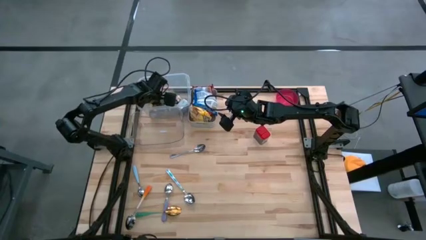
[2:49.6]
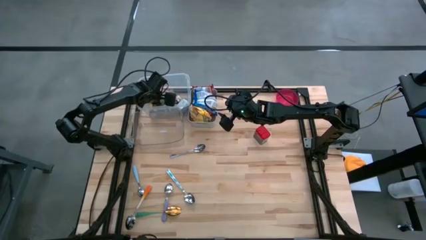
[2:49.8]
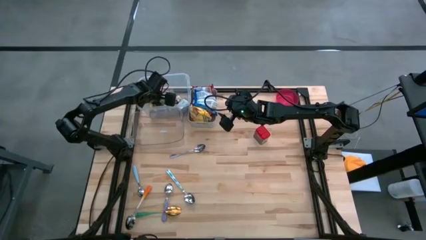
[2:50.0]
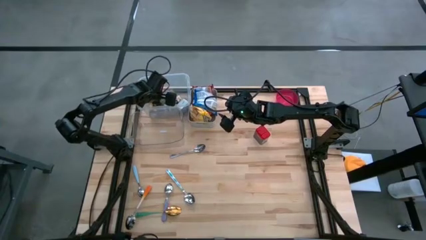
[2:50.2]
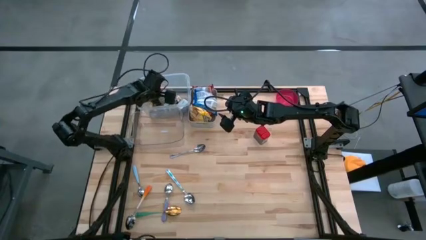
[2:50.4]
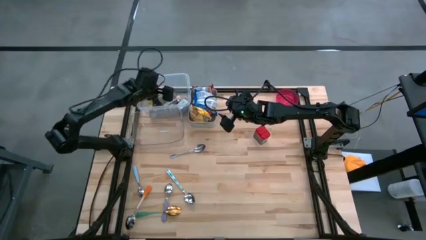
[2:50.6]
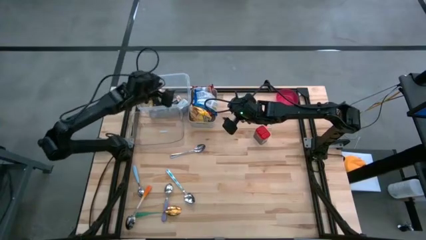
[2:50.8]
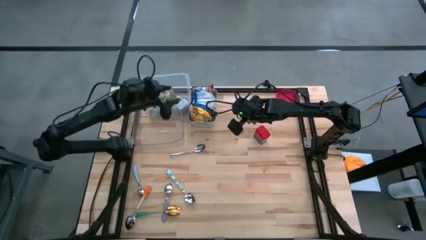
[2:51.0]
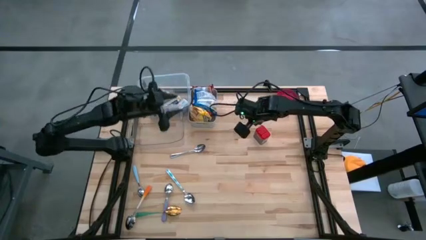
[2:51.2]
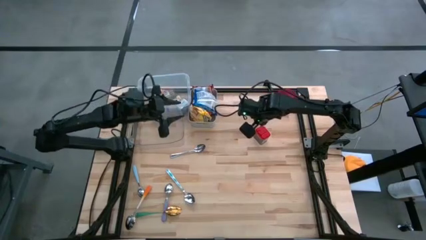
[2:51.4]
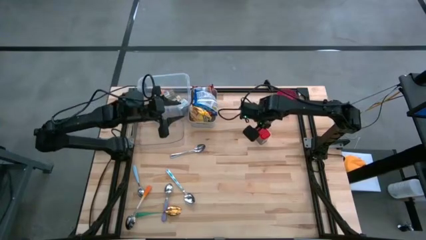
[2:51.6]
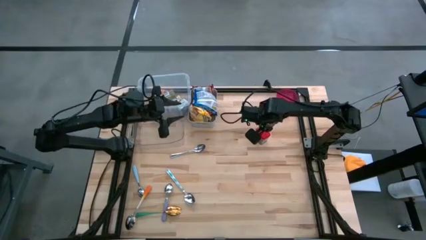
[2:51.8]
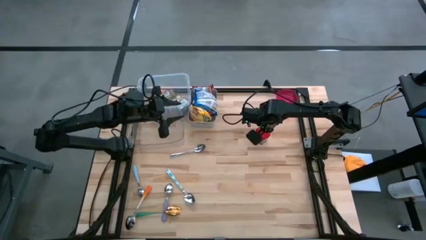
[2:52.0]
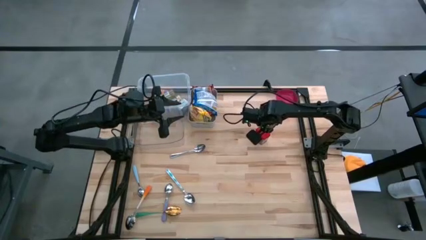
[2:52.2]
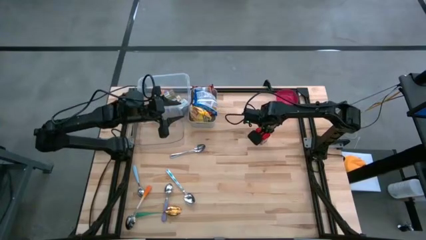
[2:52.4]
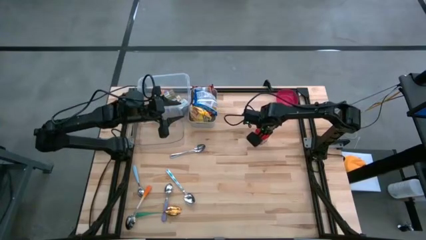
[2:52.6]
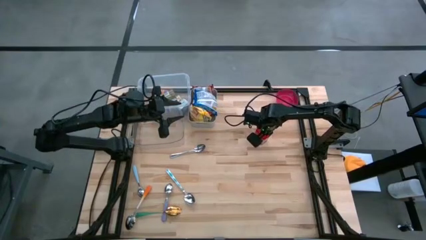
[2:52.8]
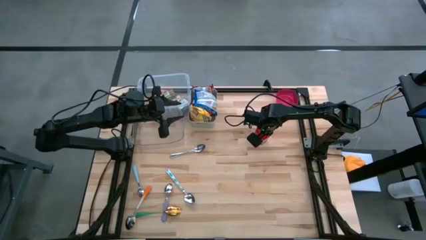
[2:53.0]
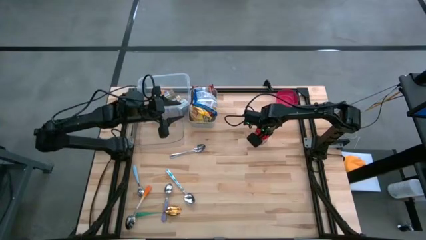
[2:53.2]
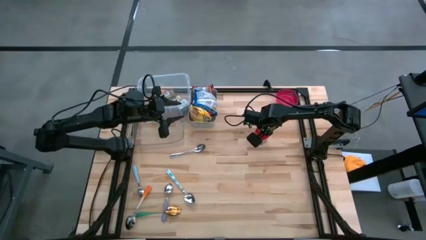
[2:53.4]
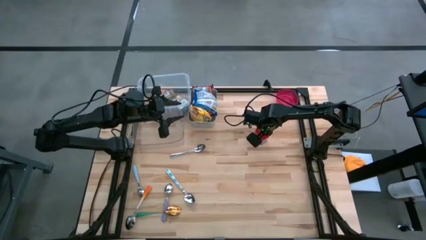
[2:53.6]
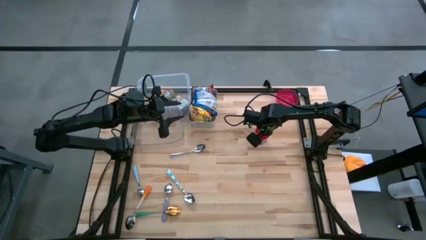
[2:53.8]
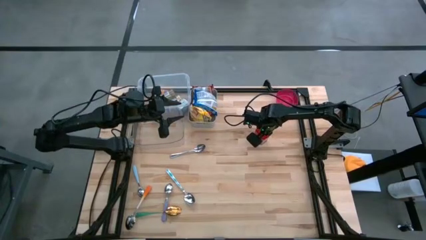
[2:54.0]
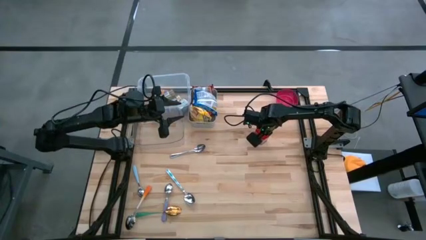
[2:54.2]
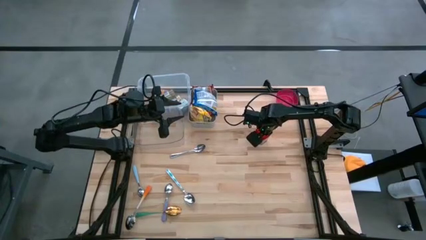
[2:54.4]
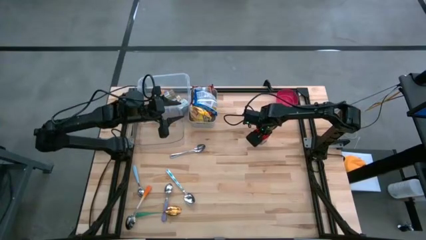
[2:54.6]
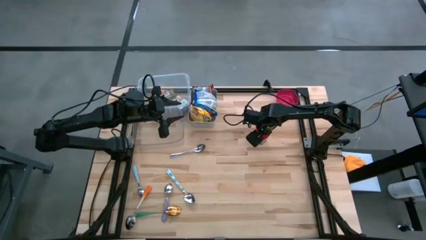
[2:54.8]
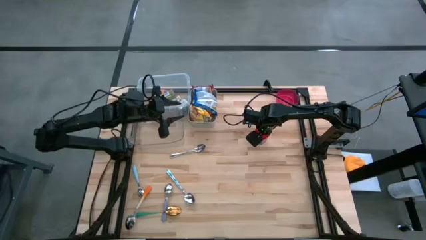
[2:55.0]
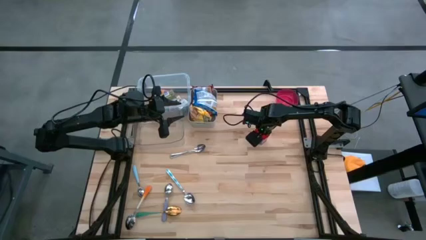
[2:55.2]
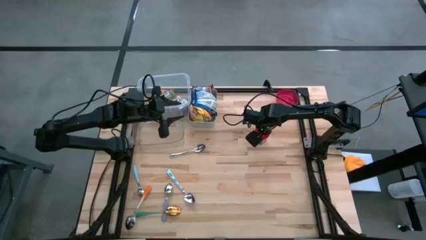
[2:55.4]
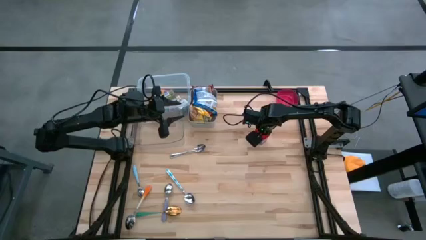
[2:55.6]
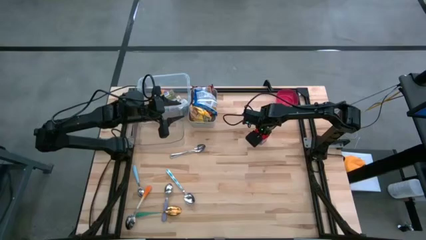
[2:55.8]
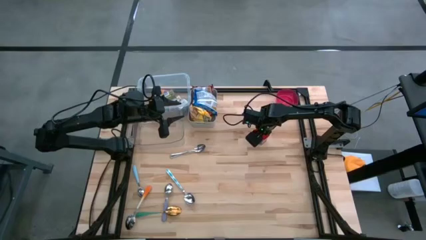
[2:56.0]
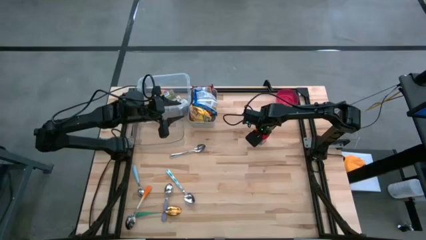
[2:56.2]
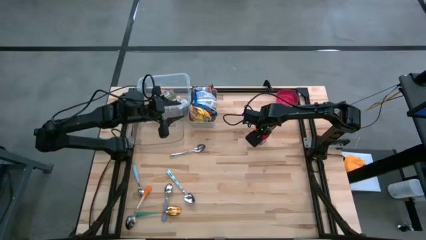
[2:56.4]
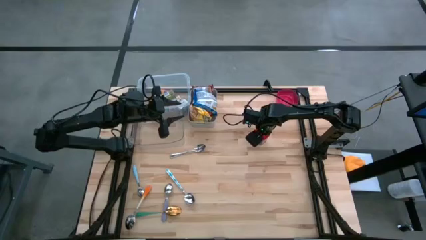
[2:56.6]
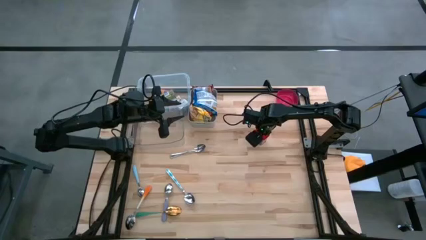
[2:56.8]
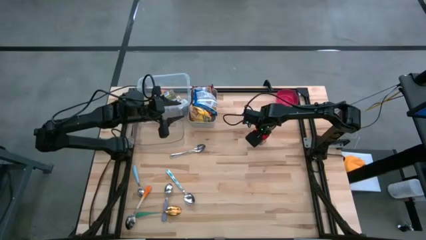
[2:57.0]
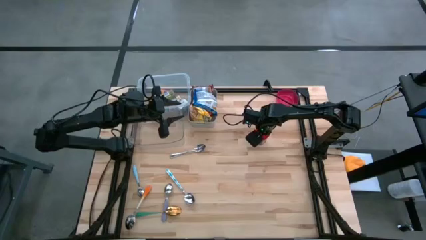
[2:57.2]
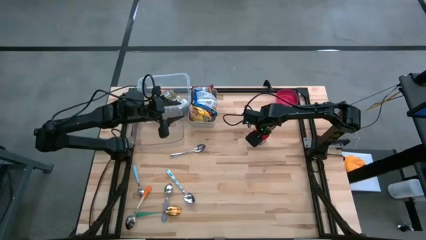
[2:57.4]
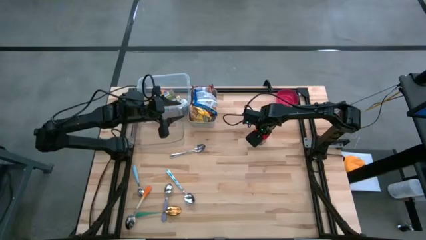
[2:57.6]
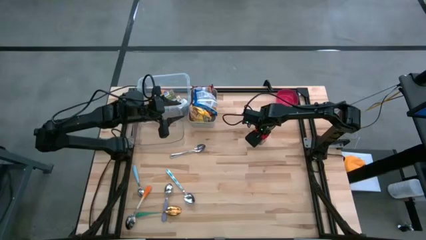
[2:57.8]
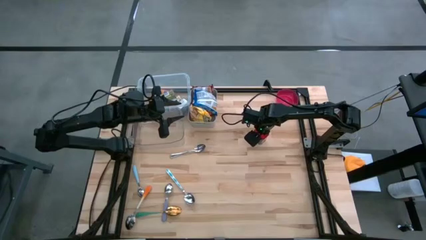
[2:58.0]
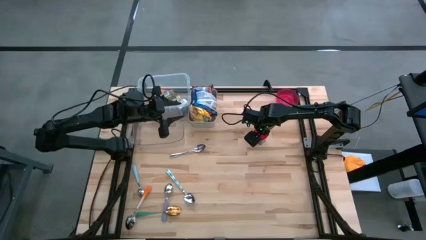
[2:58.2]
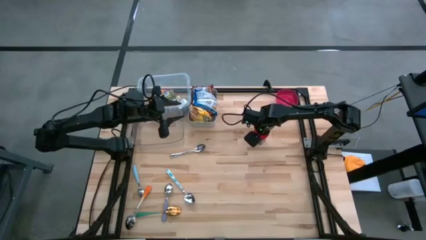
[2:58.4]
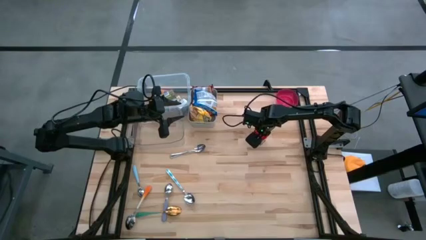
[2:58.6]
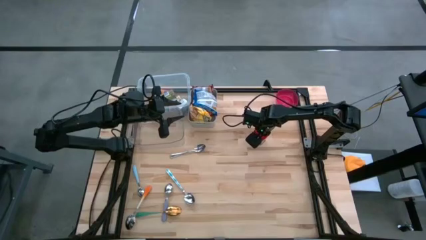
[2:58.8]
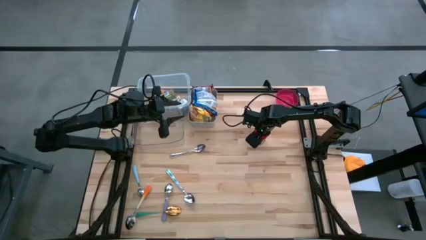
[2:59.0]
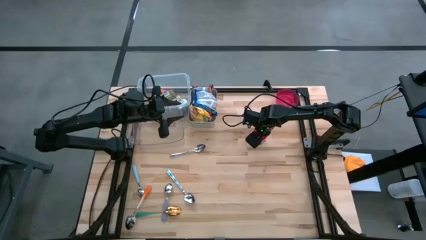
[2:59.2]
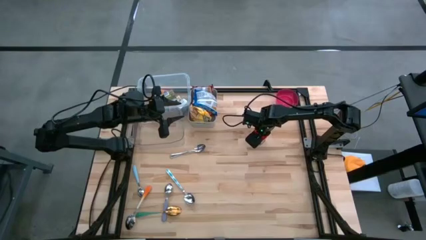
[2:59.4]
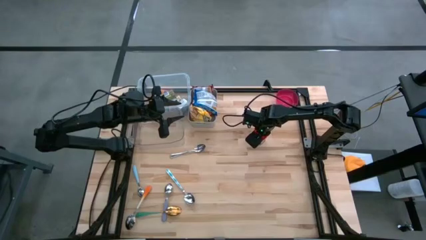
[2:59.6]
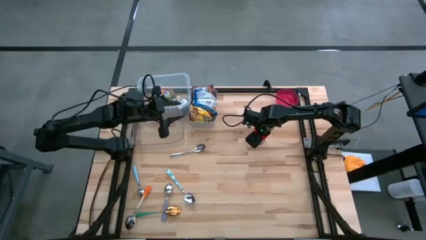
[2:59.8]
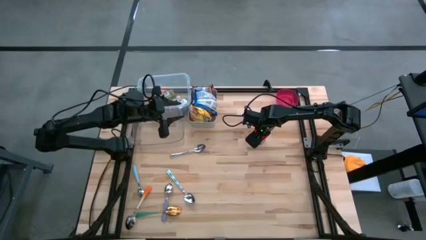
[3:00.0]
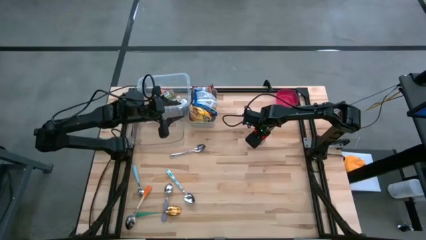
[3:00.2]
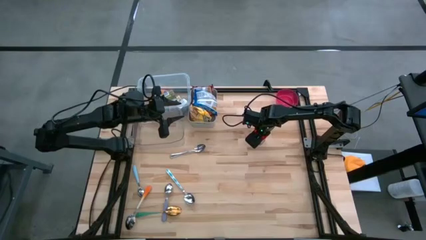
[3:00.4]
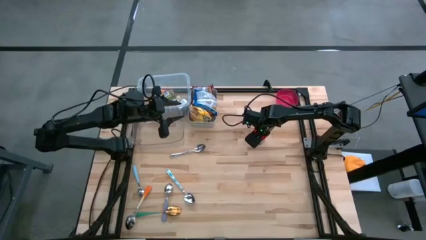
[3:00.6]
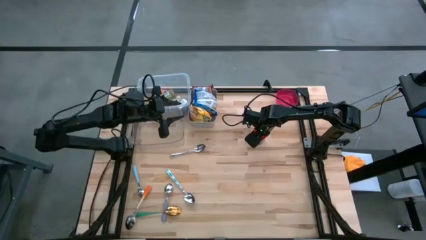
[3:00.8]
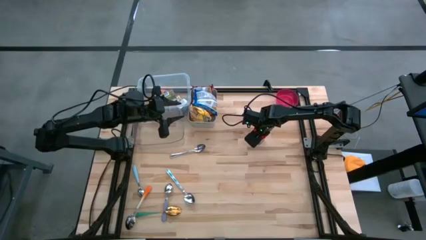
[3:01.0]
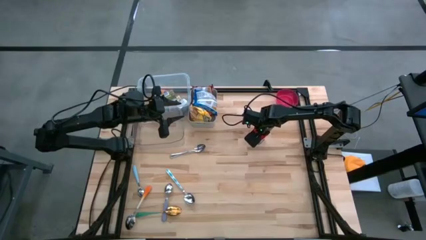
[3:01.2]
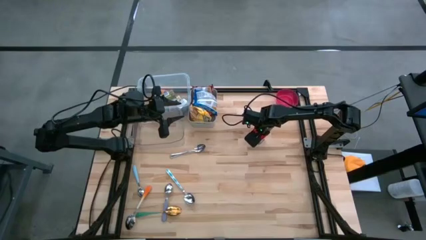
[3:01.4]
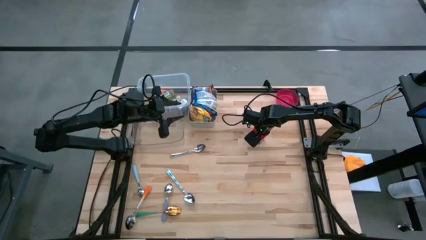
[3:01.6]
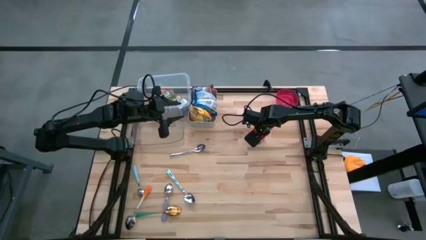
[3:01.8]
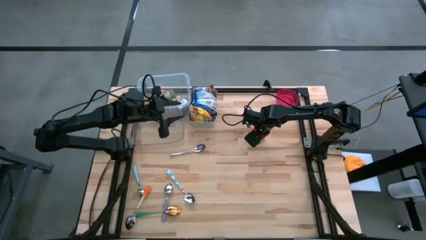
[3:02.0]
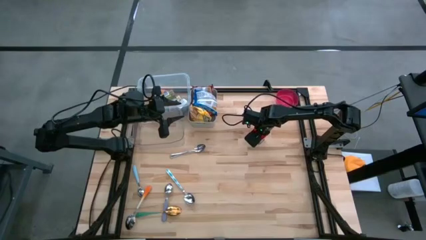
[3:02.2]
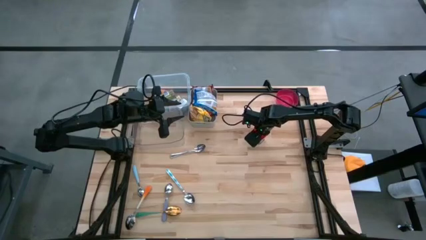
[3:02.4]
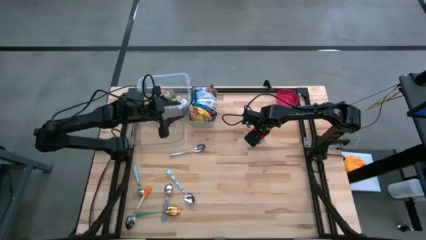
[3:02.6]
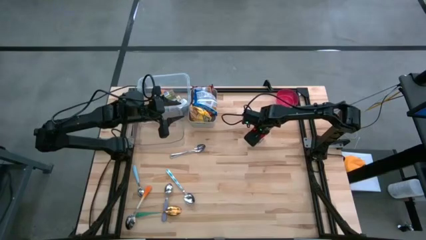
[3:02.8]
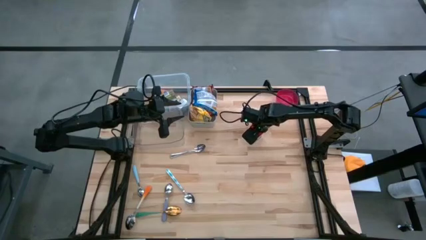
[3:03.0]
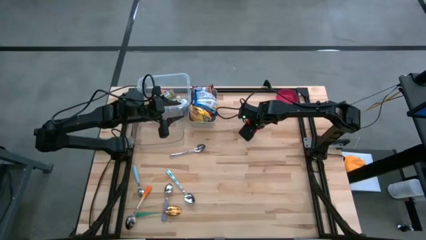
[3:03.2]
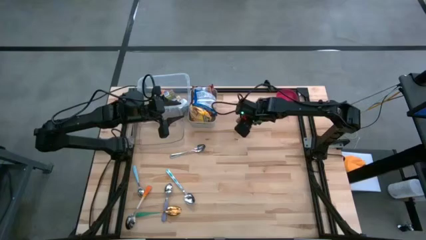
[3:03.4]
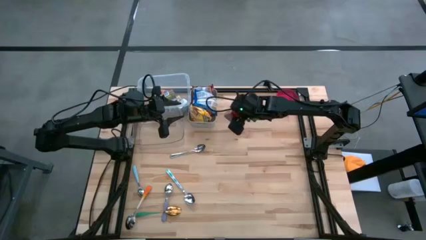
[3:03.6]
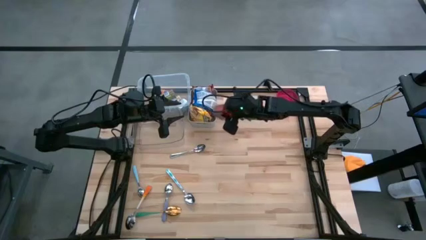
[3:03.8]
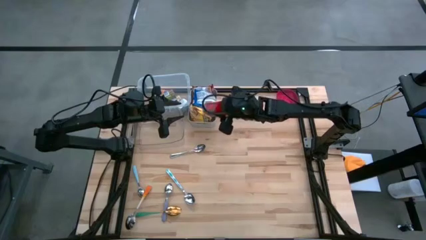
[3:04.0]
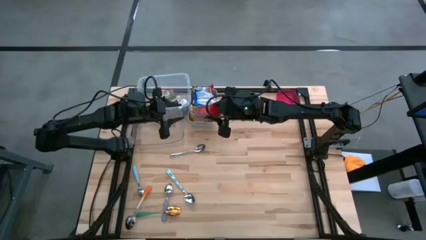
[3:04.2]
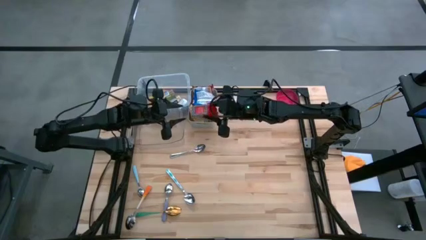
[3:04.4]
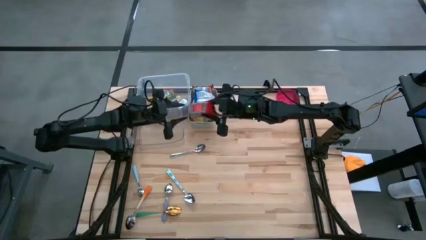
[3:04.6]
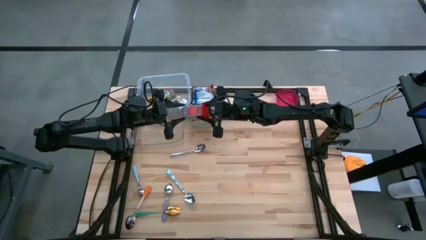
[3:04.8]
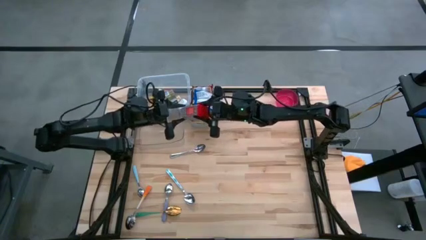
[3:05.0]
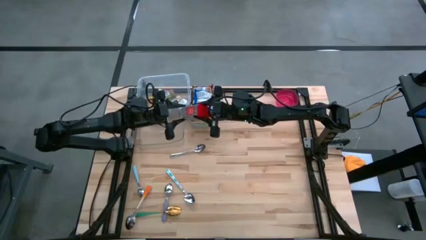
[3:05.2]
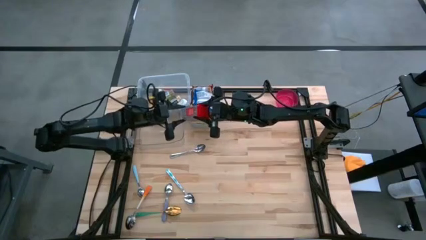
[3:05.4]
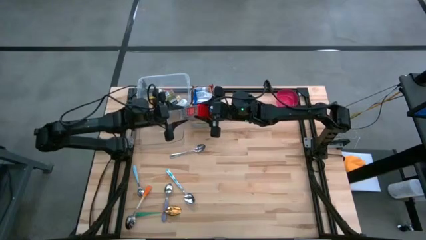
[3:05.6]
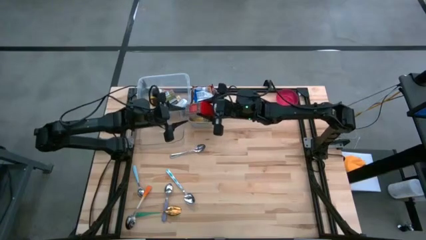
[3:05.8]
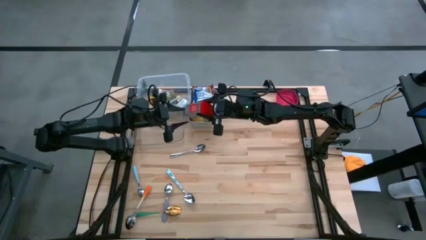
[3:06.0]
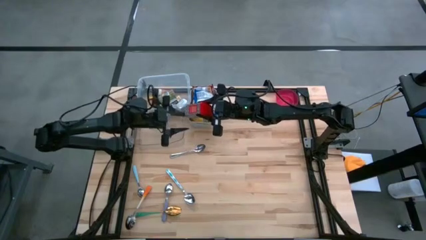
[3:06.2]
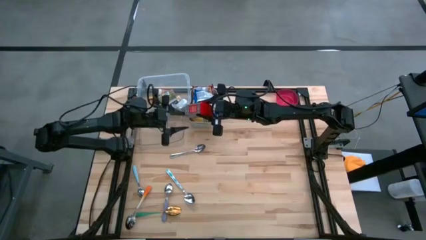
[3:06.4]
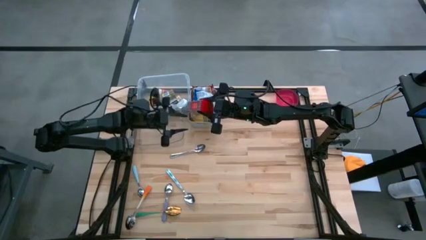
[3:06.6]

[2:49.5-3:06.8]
Put the red seasoning can into the white bin
